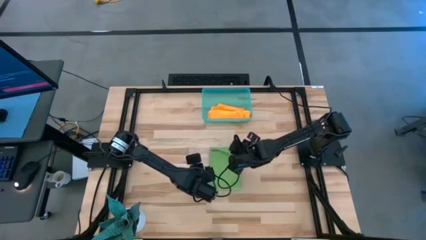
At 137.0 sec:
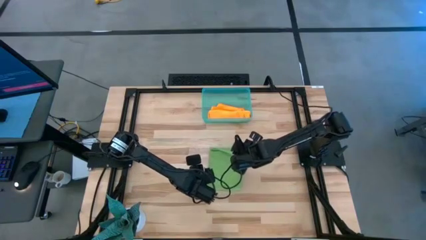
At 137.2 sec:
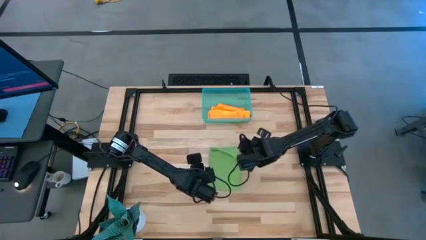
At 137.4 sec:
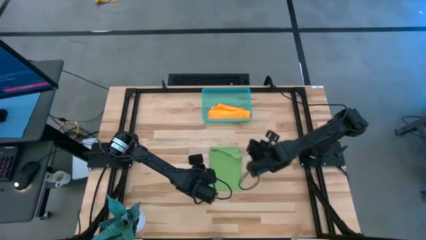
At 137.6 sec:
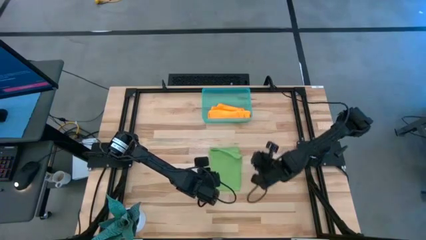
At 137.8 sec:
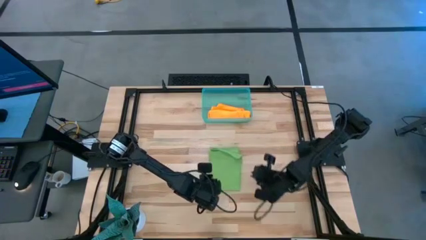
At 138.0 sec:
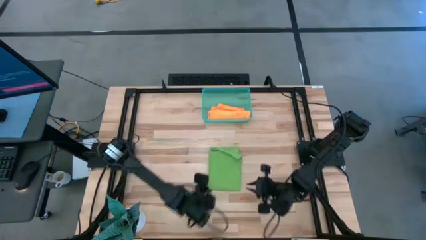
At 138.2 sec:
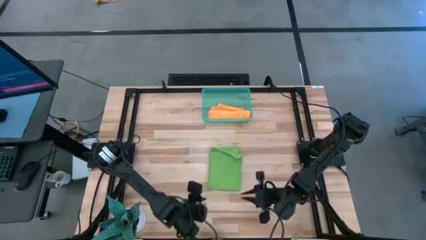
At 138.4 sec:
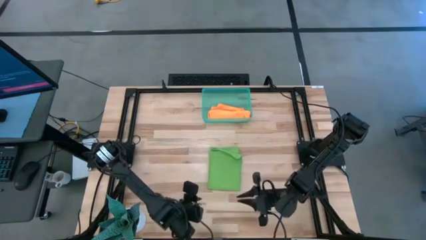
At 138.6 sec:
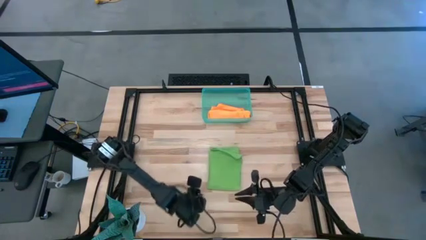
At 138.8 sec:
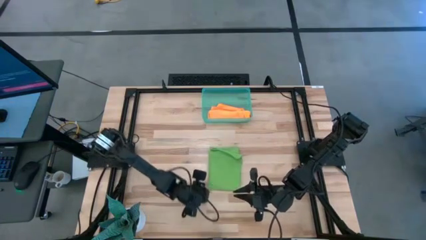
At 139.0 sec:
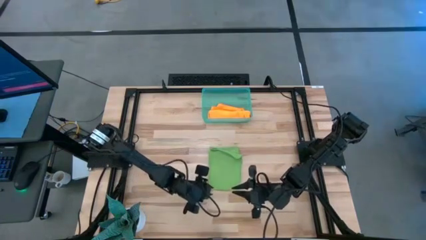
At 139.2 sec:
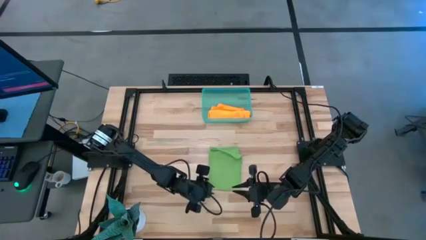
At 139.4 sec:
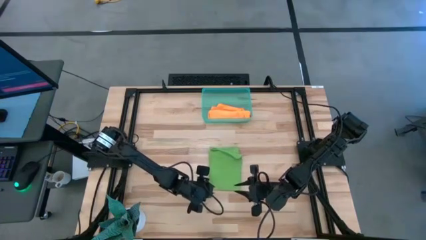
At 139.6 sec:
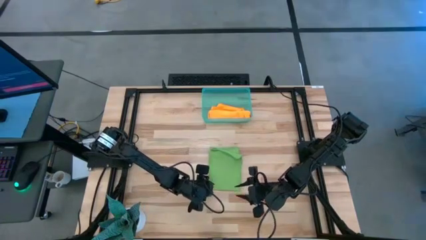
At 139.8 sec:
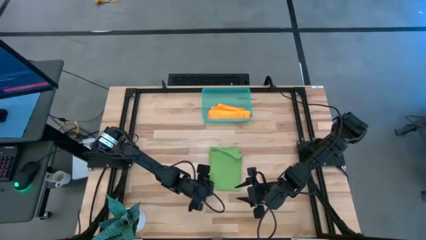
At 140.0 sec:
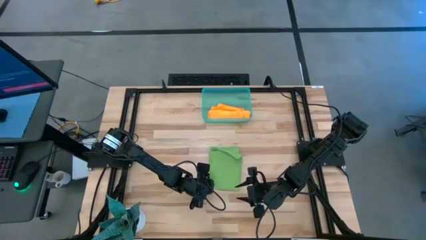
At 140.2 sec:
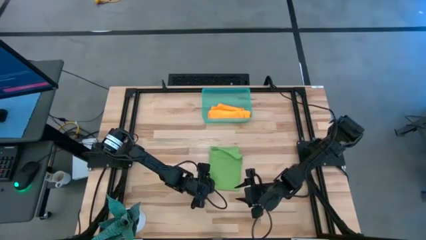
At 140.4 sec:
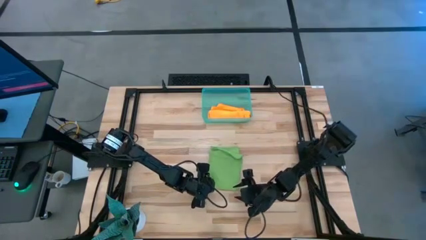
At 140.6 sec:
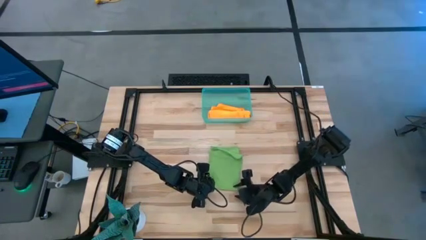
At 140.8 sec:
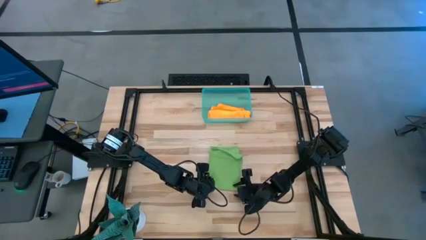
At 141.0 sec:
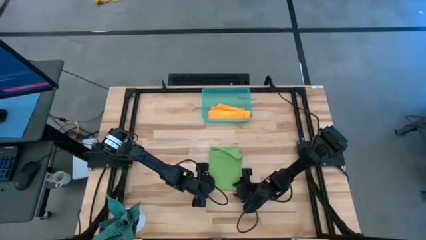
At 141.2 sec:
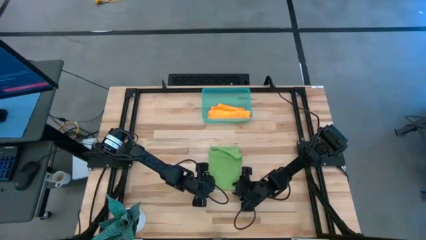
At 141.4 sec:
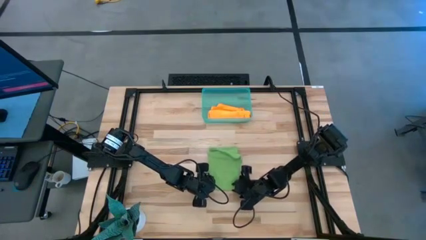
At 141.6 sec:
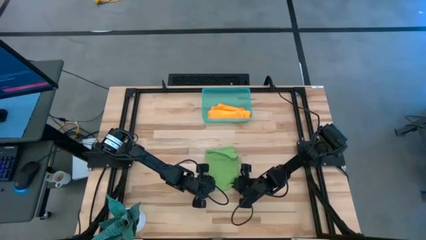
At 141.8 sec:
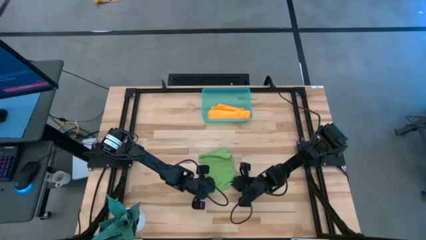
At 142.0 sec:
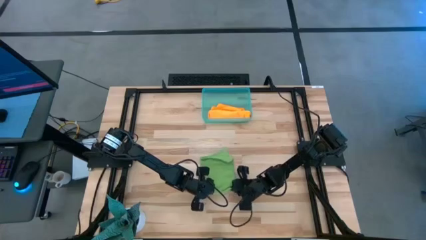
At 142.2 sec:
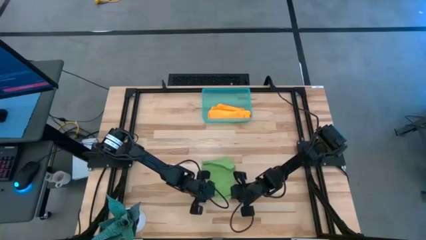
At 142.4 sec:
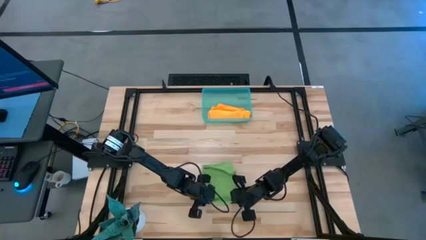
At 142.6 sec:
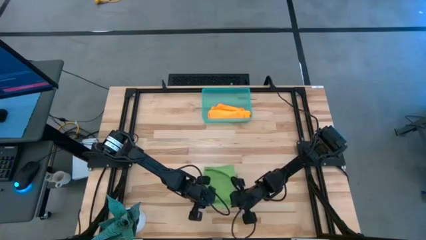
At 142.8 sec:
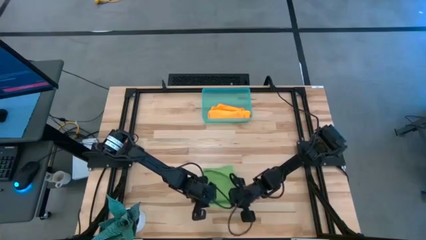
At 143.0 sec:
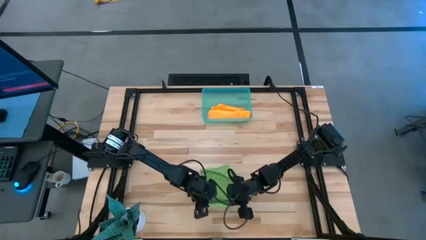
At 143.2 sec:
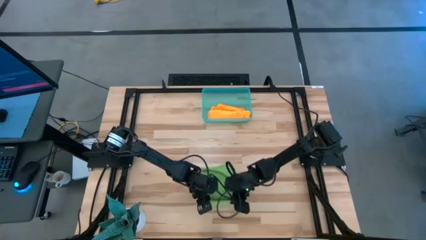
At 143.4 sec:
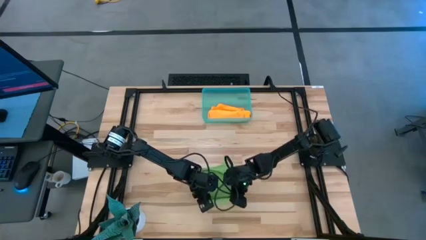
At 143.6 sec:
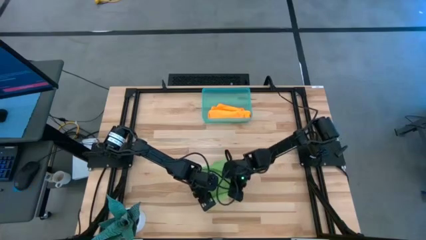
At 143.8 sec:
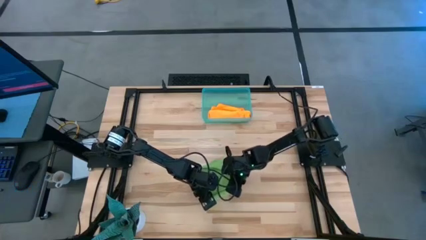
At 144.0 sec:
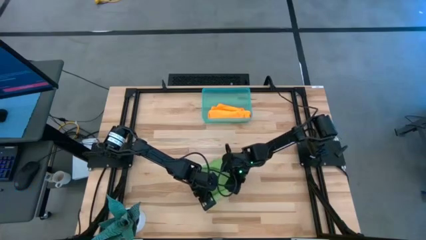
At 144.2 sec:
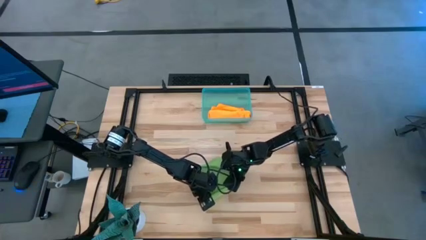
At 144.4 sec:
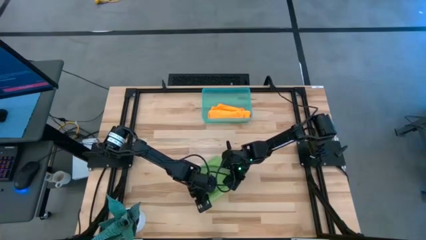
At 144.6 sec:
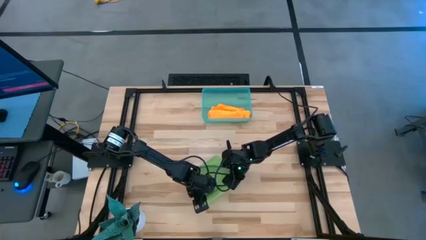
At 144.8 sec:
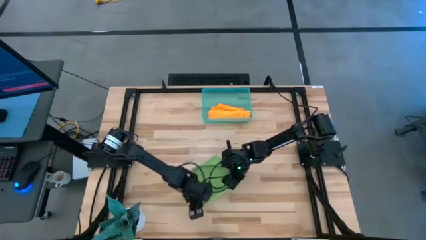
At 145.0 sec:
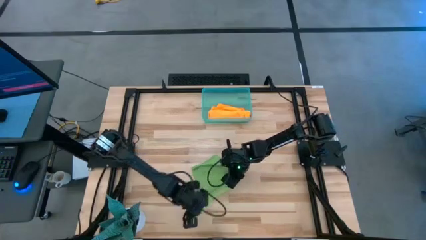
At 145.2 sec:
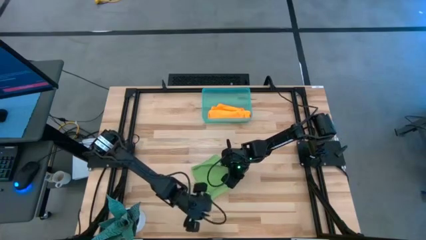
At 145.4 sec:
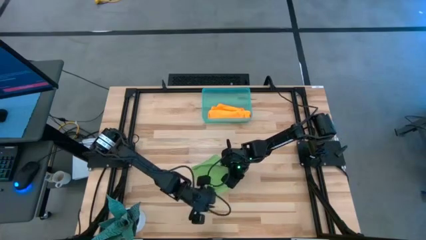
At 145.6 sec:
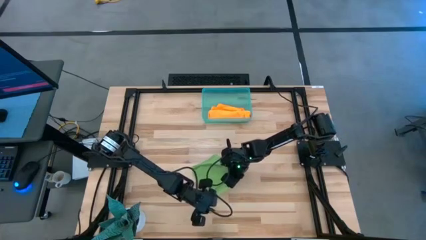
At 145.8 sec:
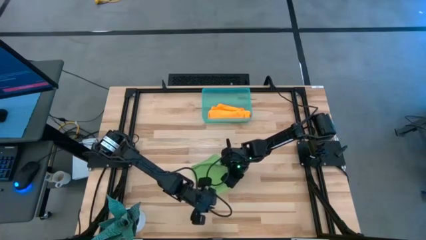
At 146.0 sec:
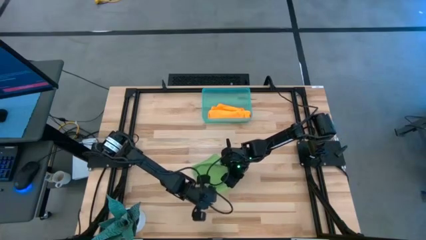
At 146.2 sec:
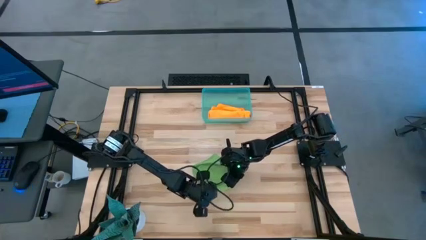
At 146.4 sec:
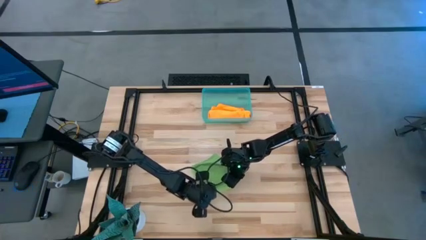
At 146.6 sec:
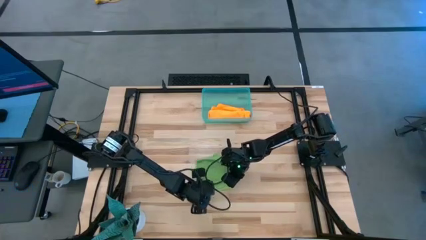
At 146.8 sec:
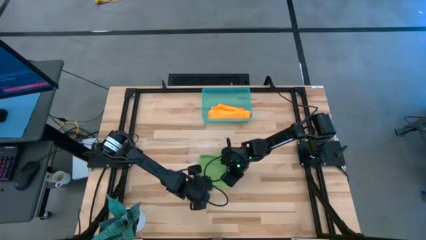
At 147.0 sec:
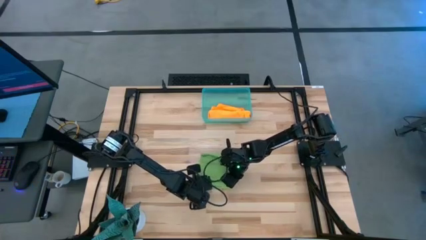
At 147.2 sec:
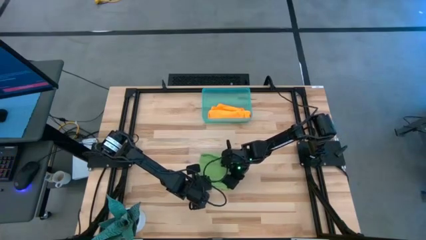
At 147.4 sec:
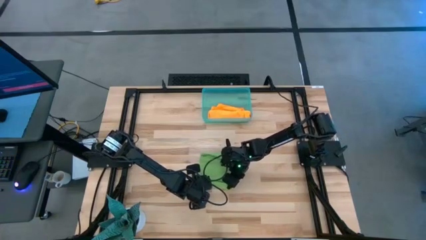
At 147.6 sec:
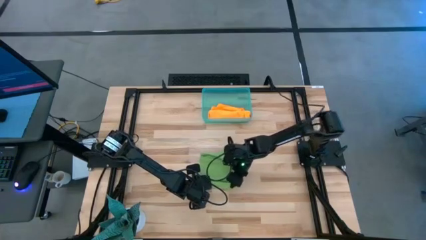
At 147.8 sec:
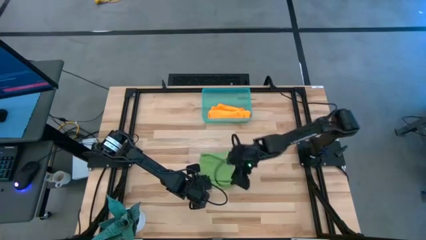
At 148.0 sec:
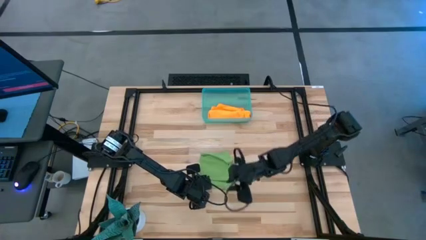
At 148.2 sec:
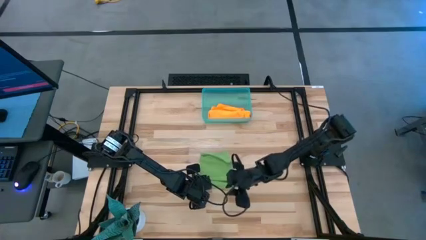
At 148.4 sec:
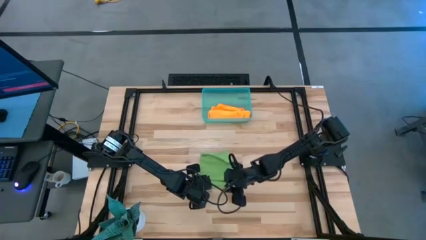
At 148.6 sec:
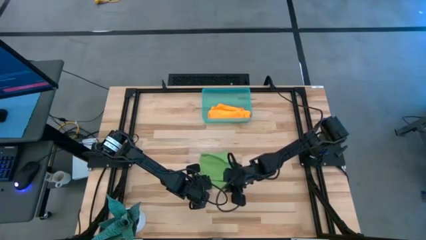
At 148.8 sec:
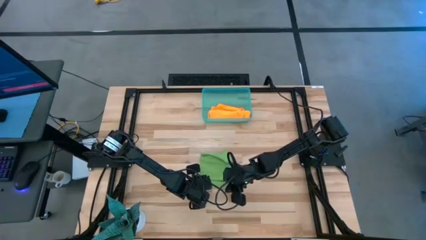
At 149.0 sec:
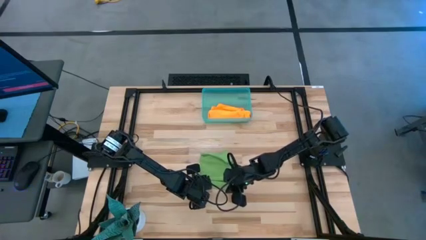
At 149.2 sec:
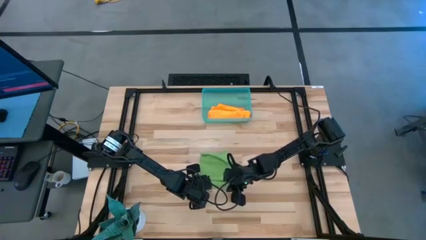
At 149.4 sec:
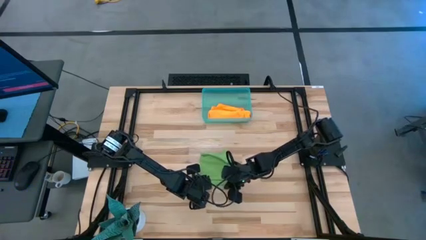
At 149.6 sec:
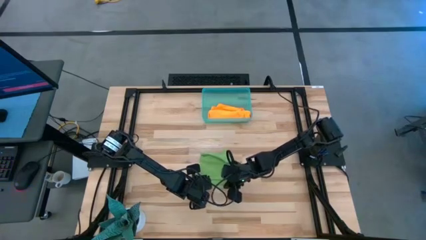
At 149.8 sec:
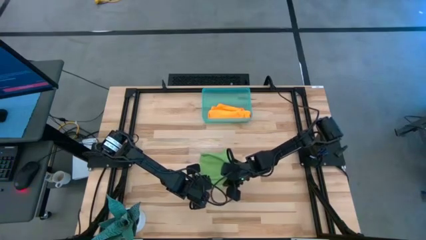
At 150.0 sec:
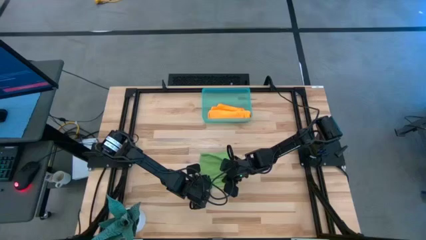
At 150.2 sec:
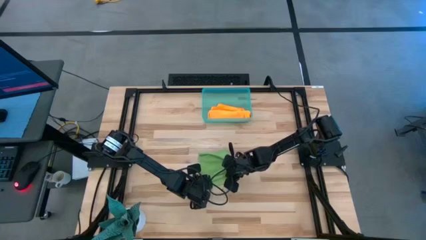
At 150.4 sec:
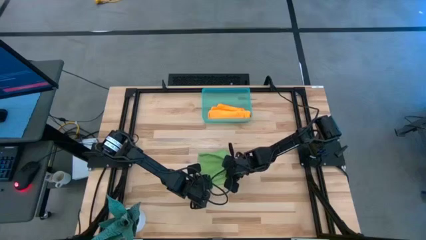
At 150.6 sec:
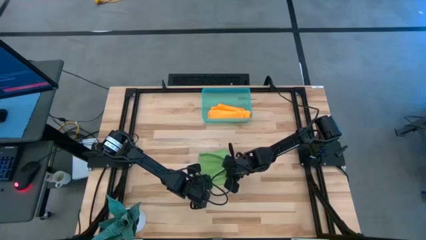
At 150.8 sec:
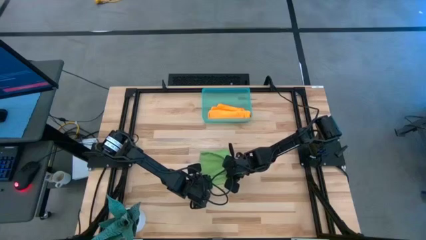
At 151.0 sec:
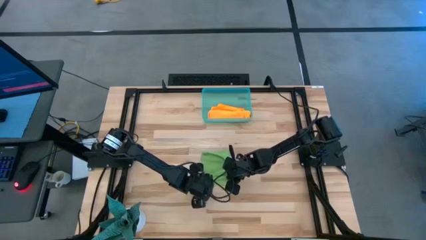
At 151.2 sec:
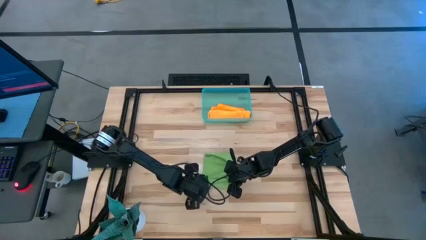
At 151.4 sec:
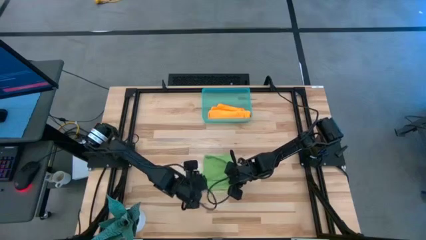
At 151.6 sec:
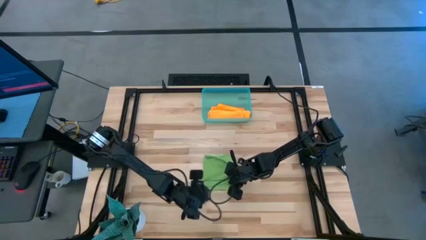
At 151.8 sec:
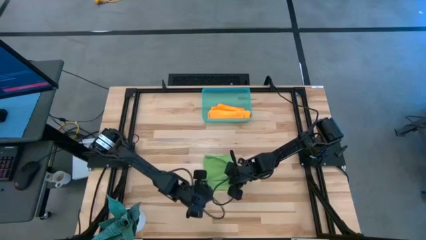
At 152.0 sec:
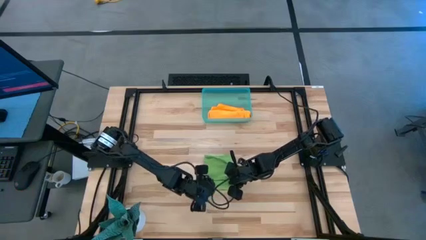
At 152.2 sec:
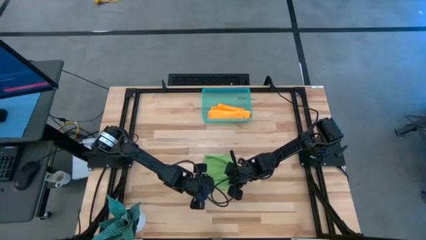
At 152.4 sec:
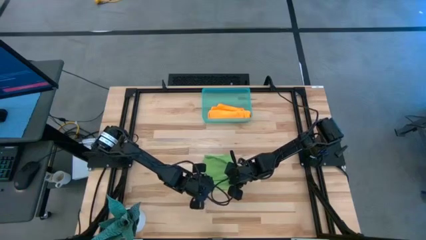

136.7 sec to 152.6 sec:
Task: Roll microfiber towels into tight, uniform cylinder then place into a basket
Roll the green microfiber towel
